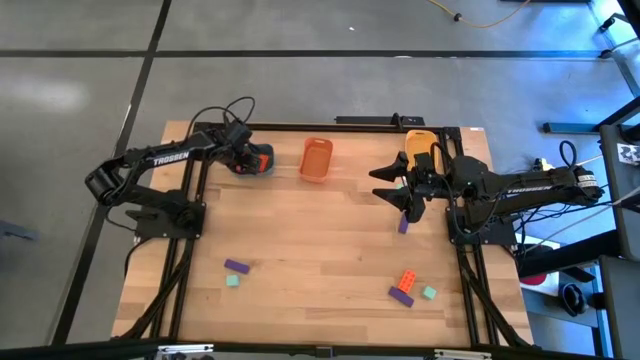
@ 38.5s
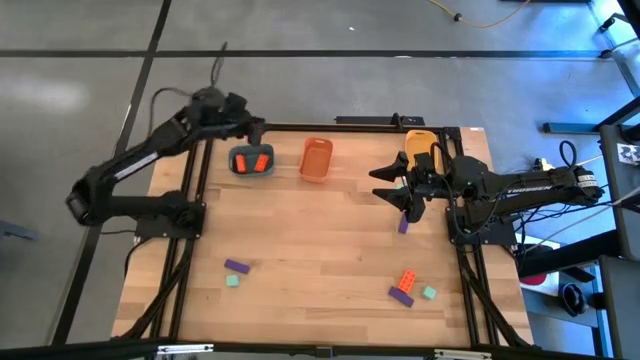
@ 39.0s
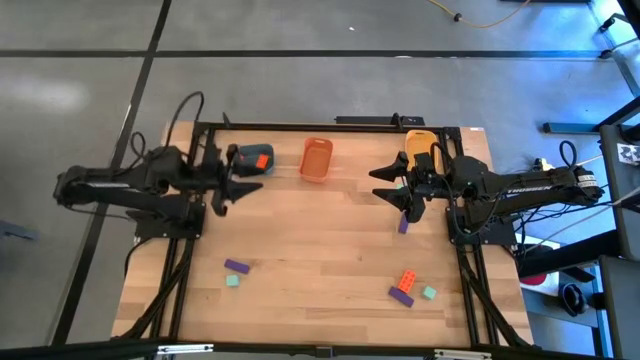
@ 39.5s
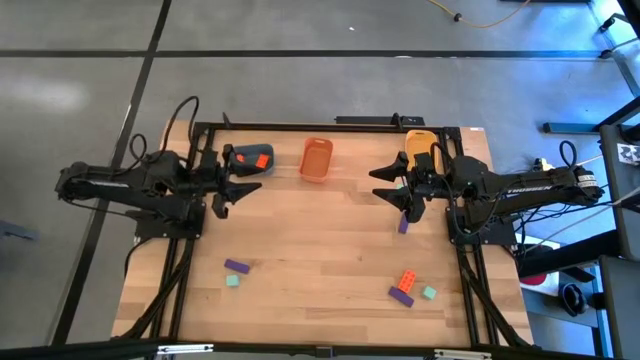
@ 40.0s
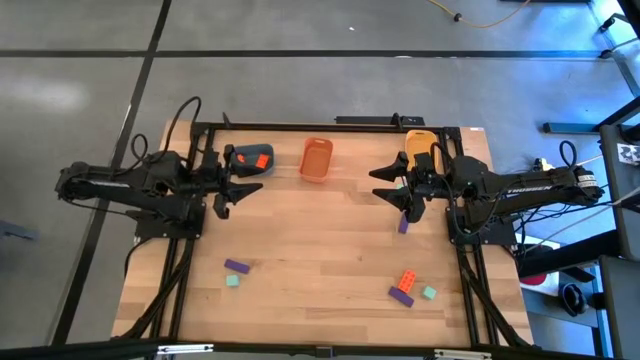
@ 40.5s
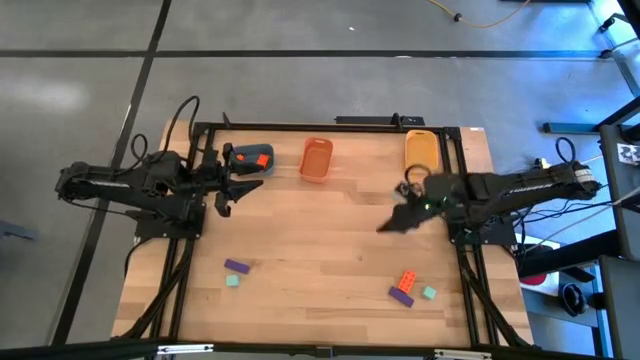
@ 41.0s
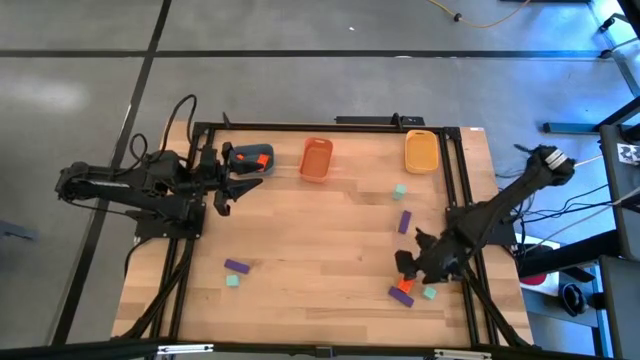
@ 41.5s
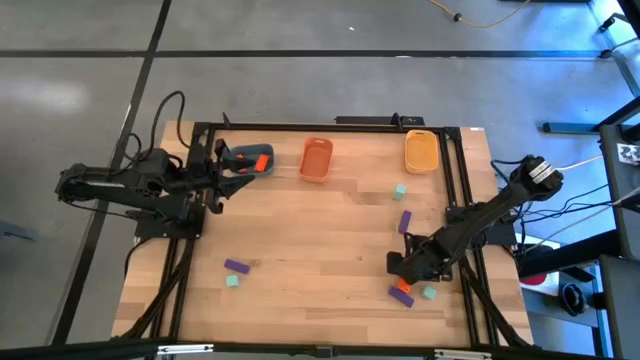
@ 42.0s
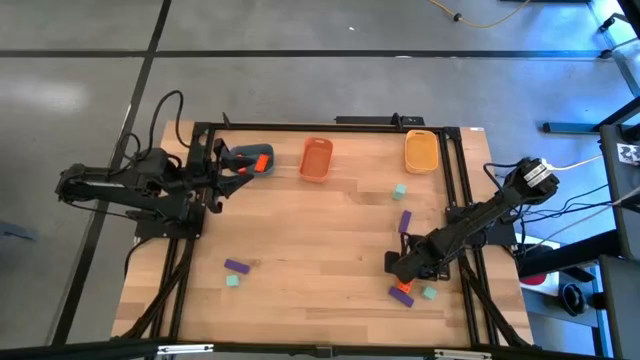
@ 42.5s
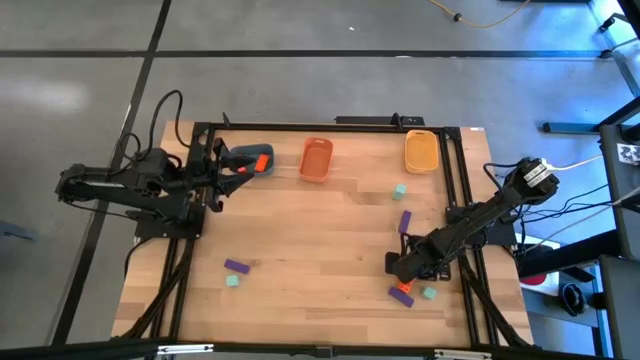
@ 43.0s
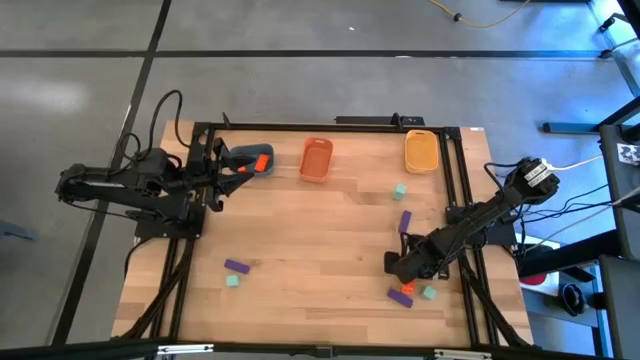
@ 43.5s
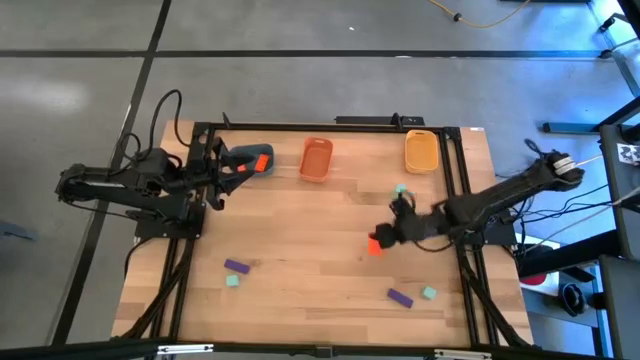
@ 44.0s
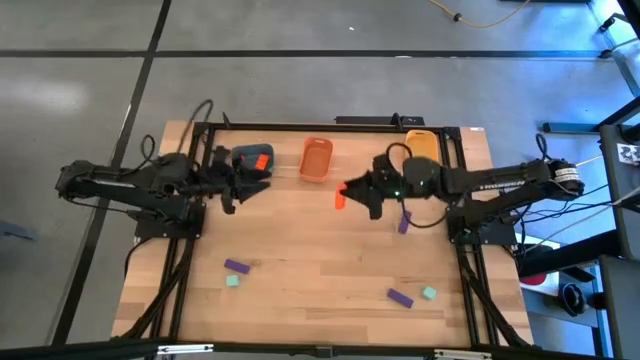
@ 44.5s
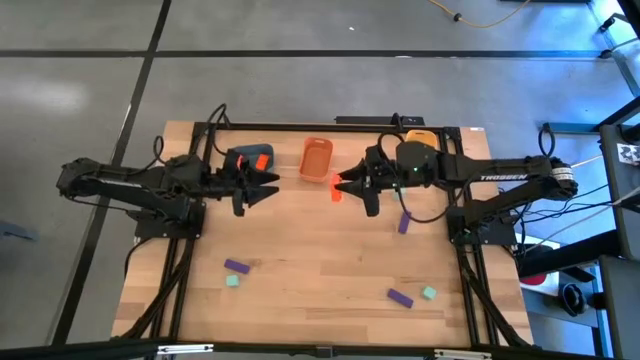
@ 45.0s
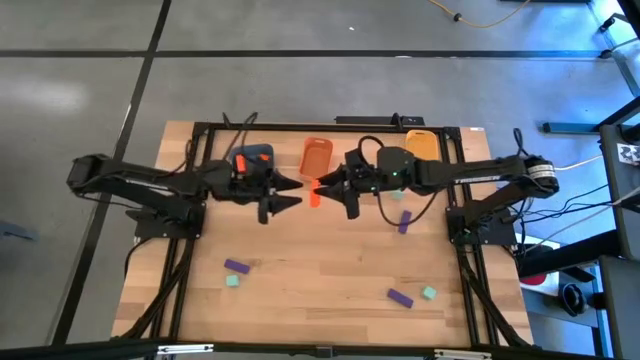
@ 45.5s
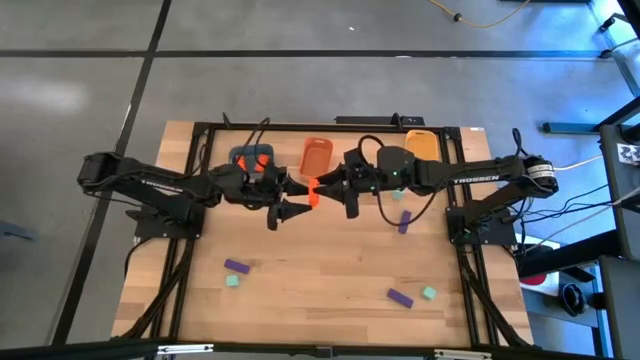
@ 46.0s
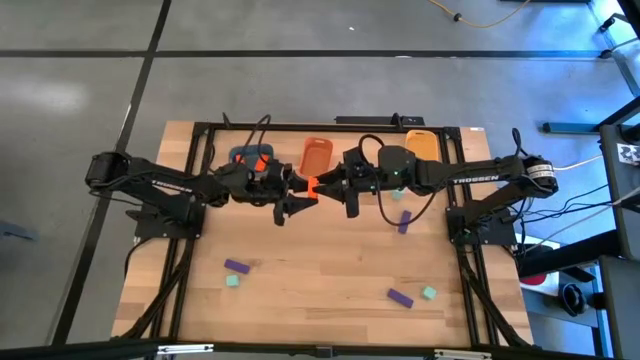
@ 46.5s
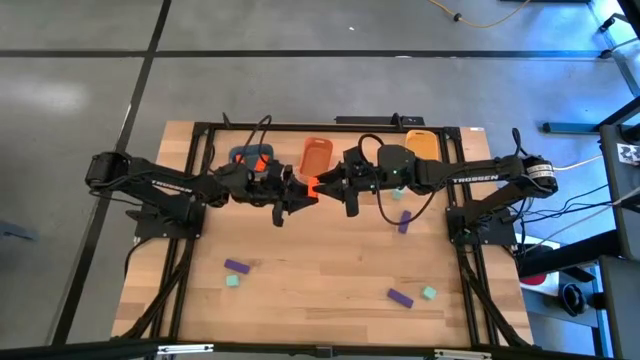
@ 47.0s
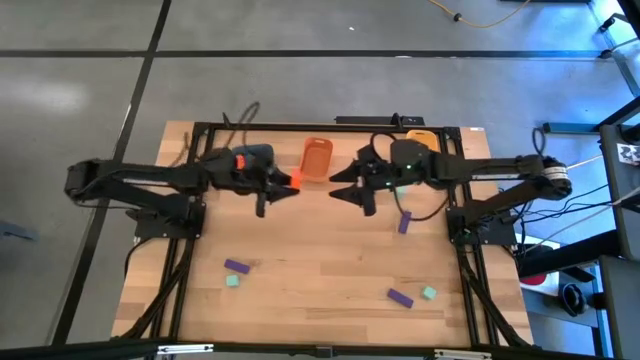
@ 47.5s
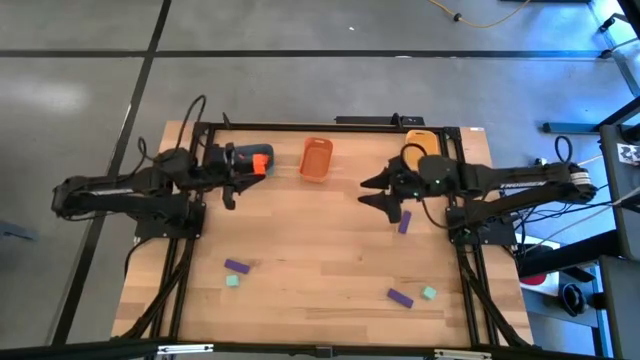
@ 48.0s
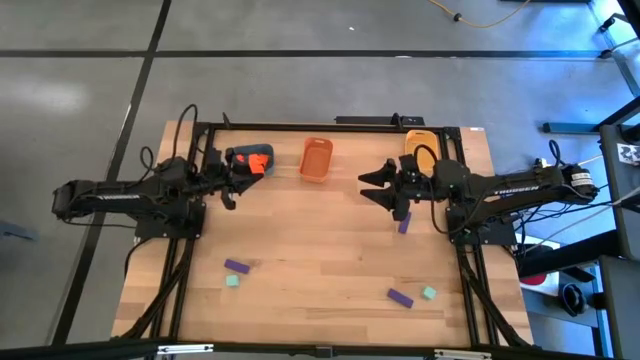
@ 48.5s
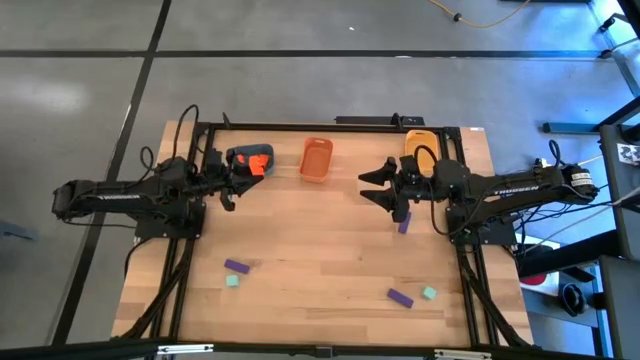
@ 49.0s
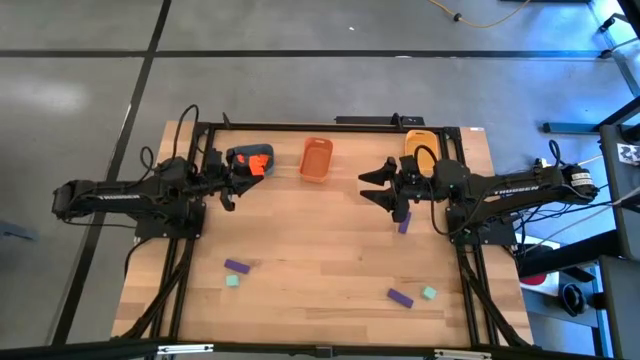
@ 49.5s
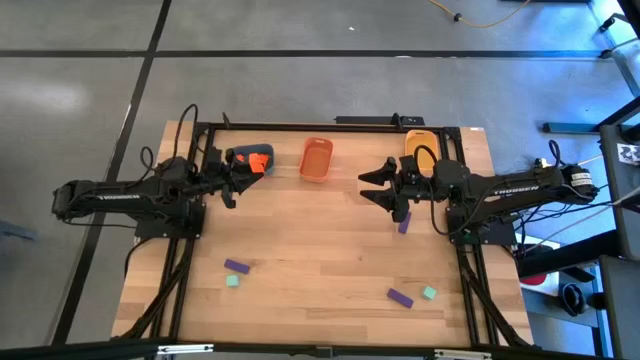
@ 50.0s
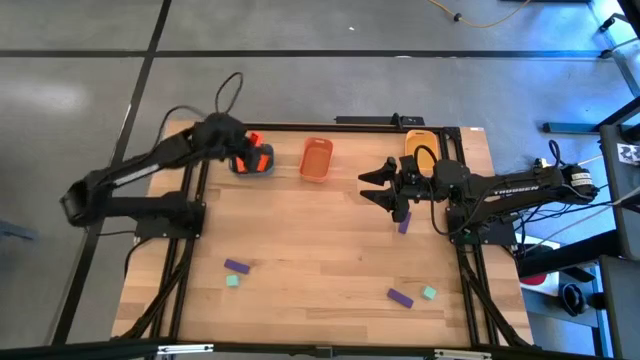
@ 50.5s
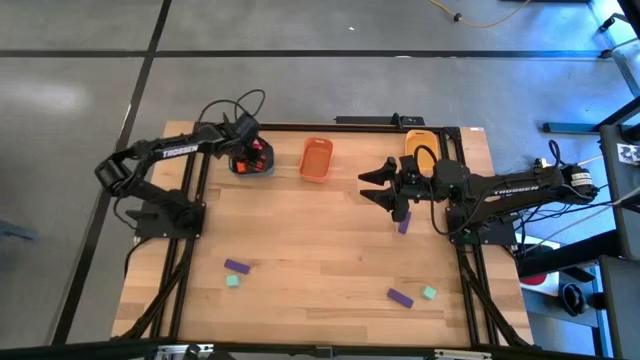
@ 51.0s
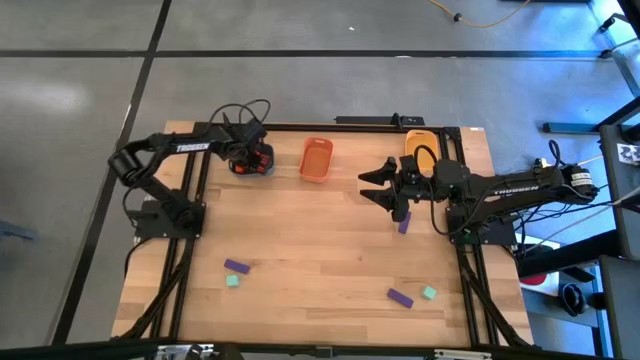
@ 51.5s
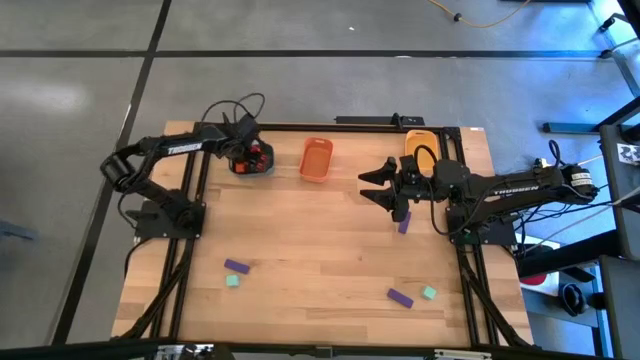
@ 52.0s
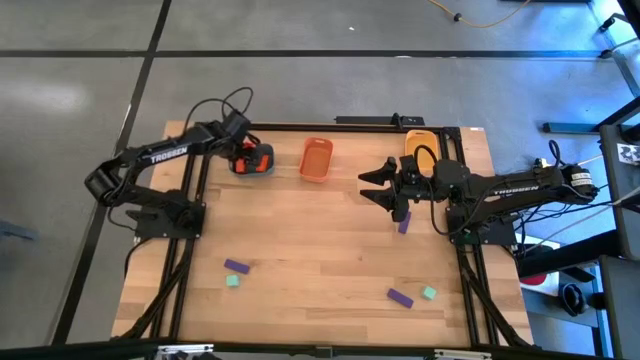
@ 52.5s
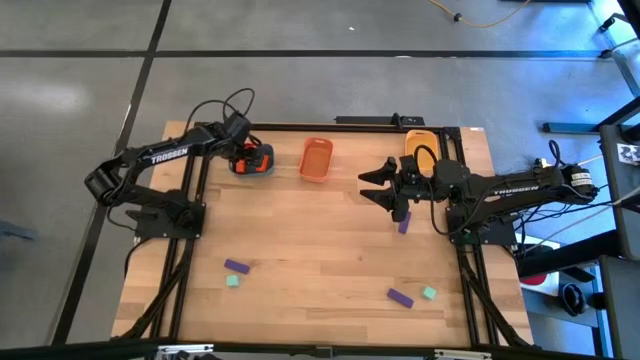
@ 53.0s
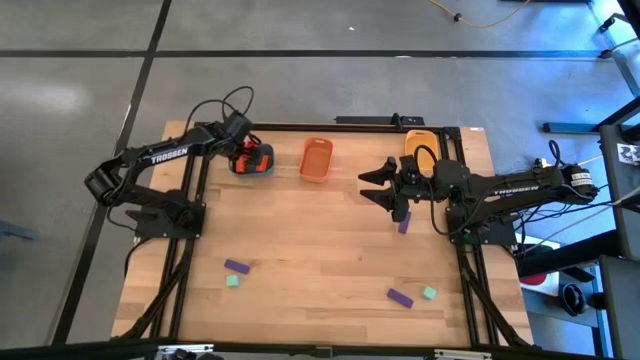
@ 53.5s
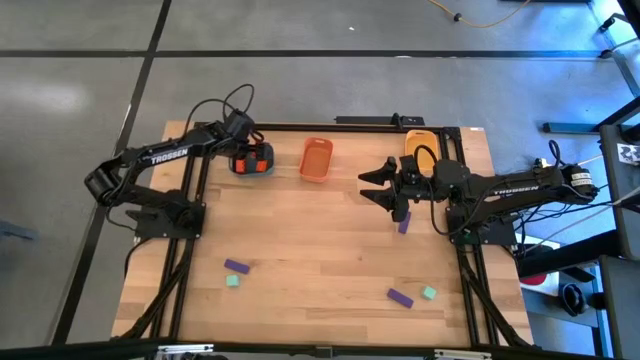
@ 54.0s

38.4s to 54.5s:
Task: Sort & place blocks by color
Put the orange gamepiece into the blue bin

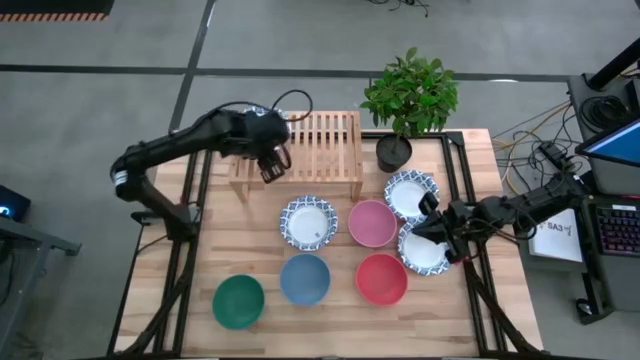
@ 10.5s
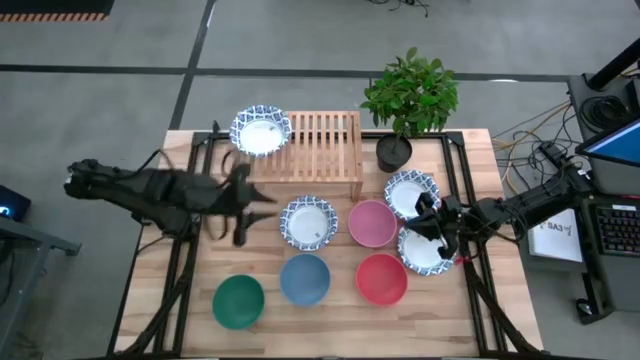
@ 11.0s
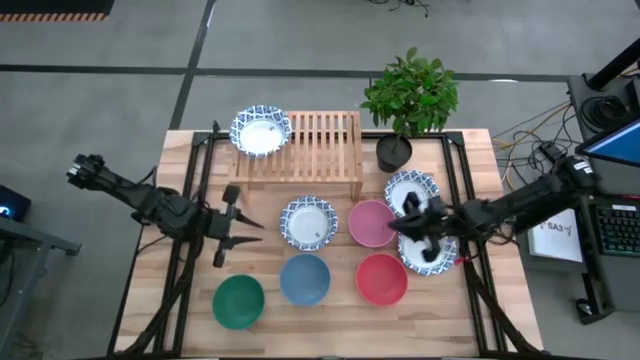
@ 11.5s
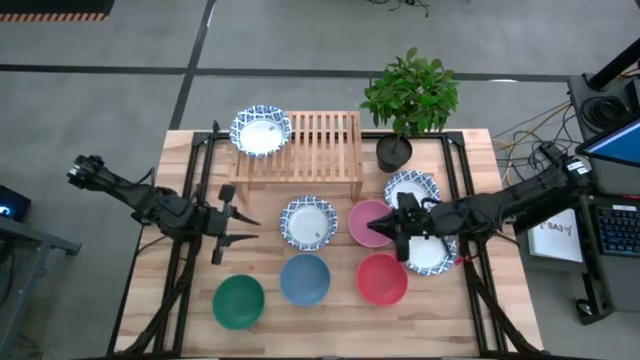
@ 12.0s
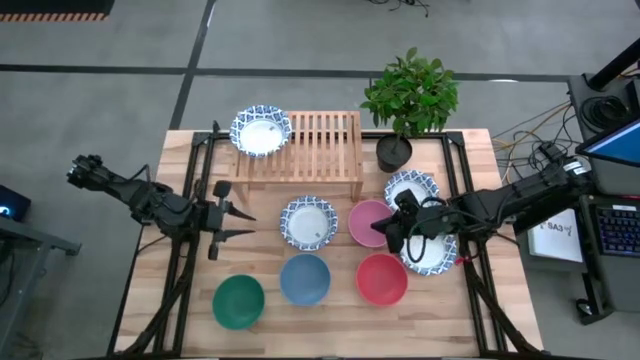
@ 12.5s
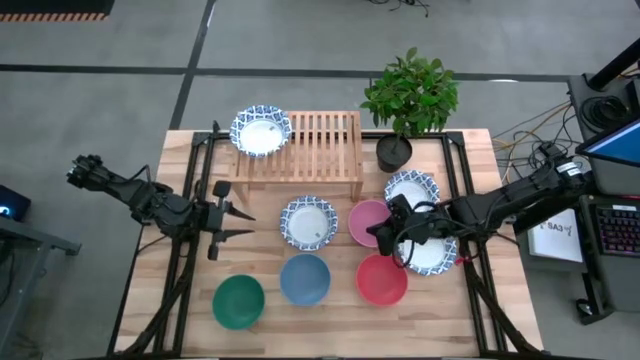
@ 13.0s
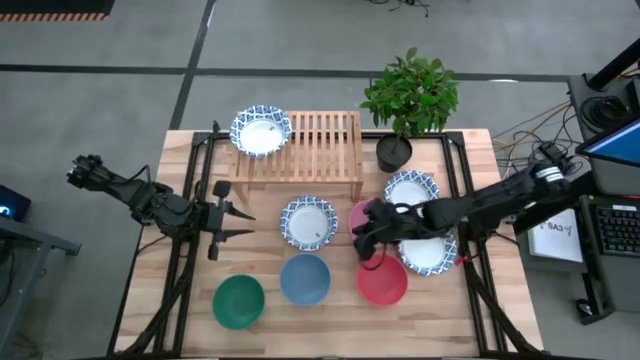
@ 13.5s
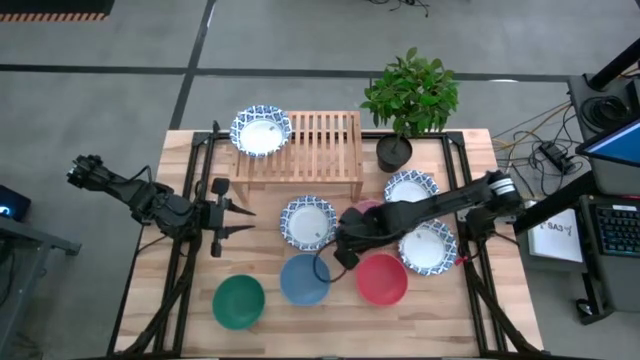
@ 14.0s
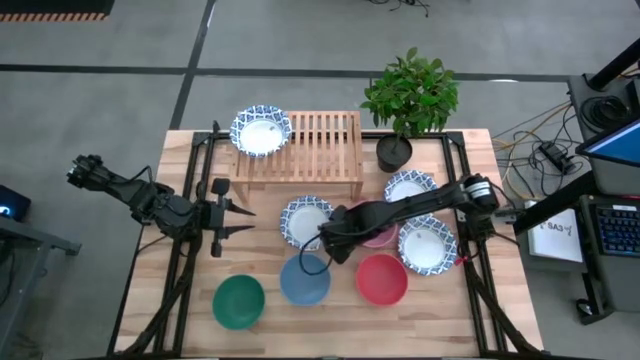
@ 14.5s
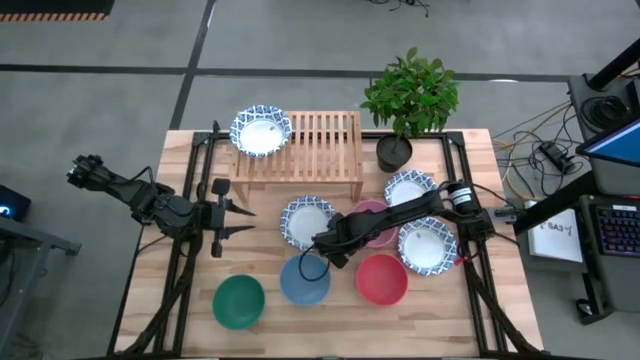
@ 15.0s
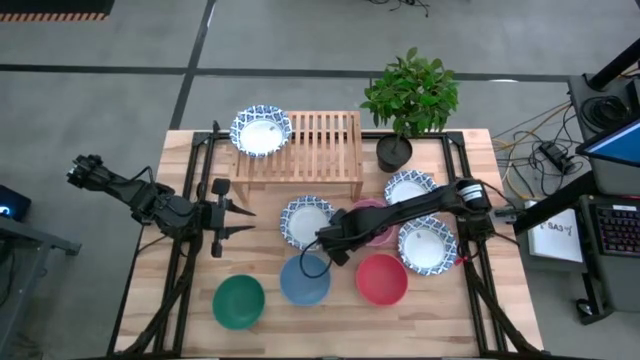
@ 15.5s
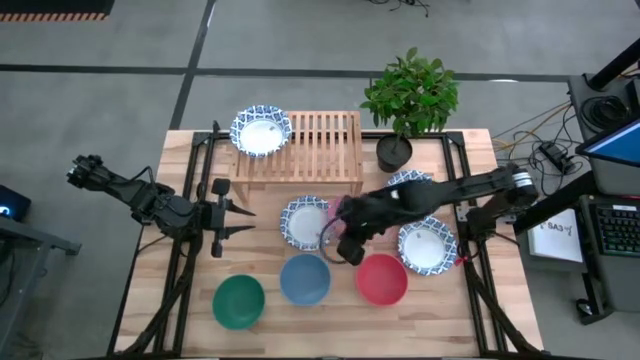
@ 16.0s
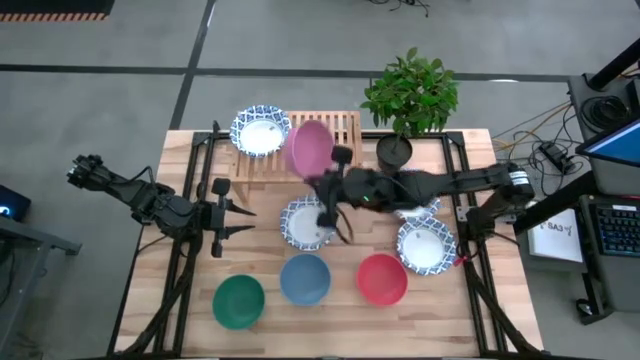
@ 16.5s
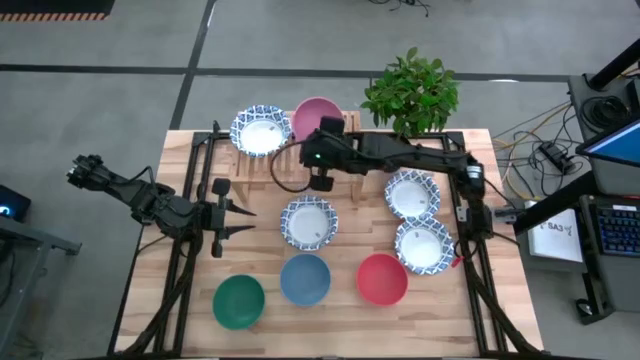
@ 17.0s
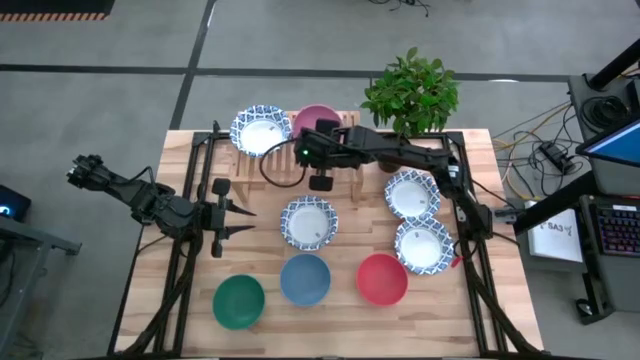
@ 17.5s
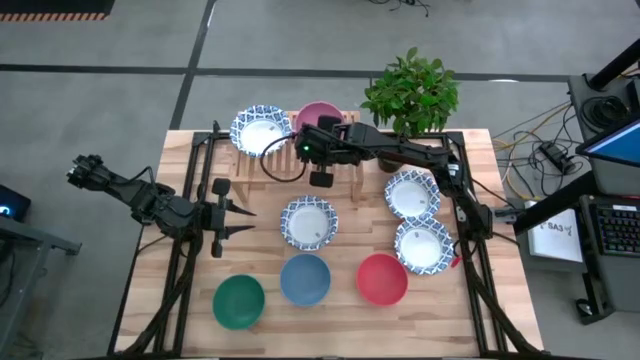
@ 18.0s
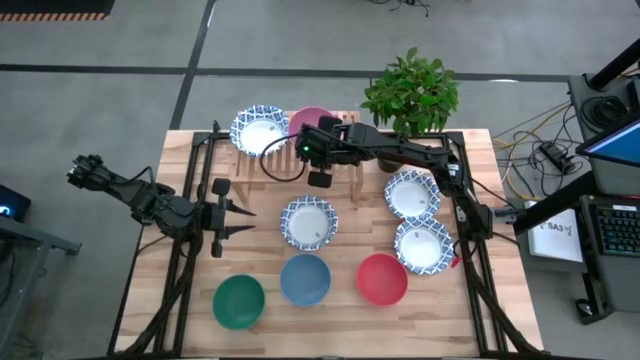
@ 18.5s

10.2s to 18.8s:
Task: Place and stack bowls onto a shelf
Put the pink bowl on the shelf
